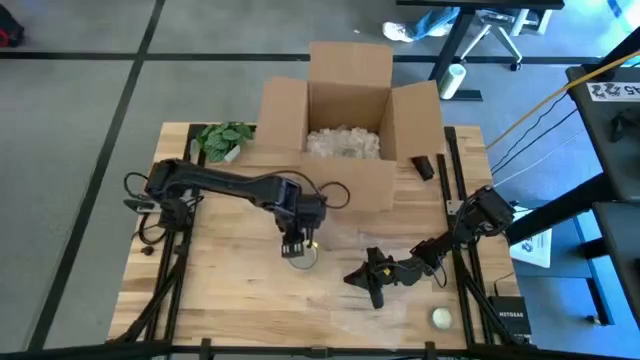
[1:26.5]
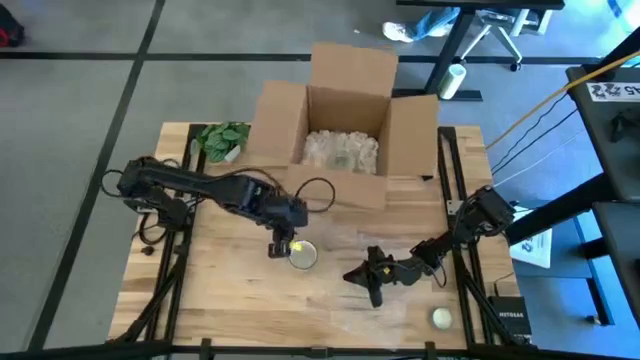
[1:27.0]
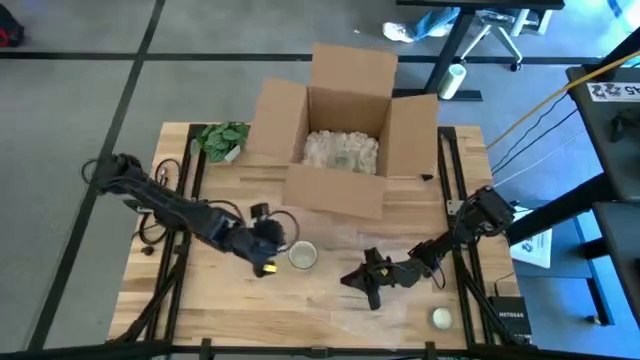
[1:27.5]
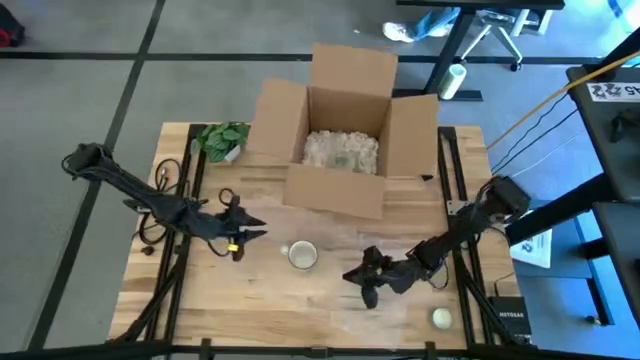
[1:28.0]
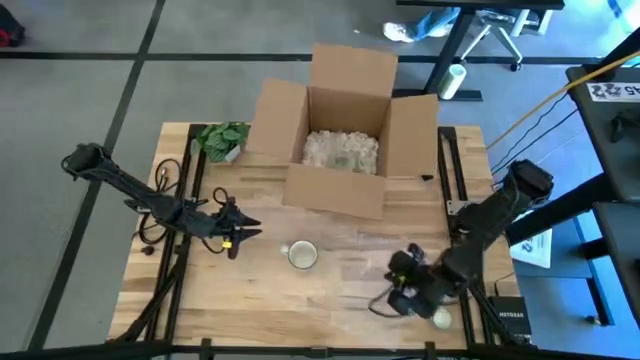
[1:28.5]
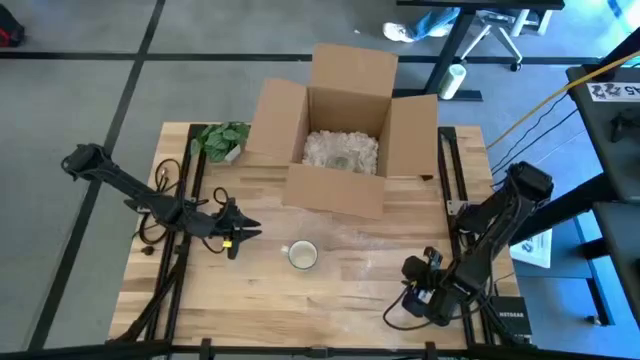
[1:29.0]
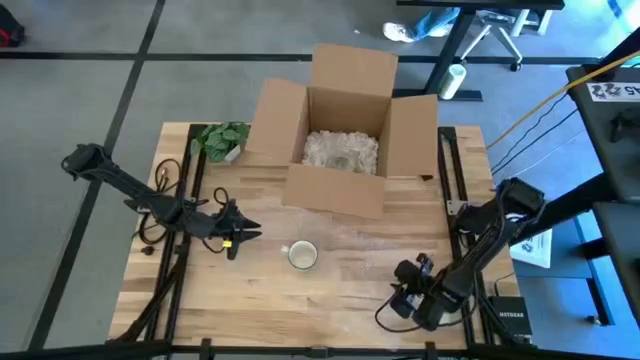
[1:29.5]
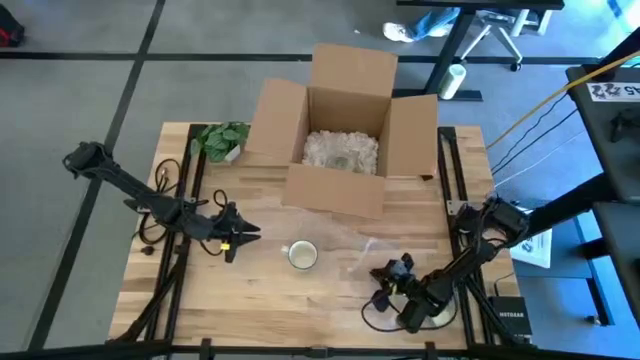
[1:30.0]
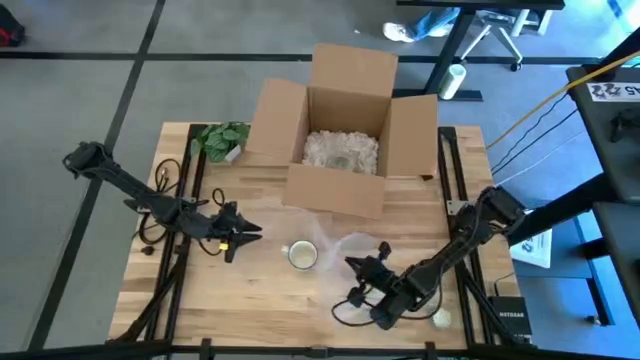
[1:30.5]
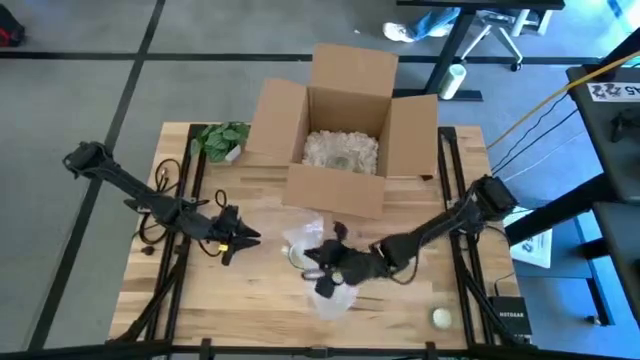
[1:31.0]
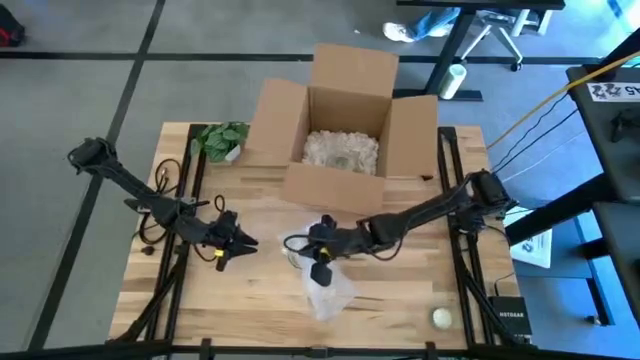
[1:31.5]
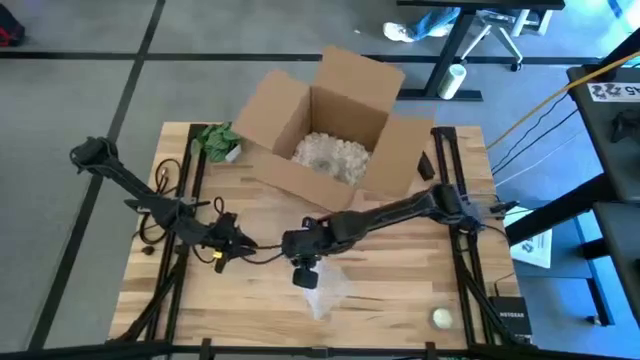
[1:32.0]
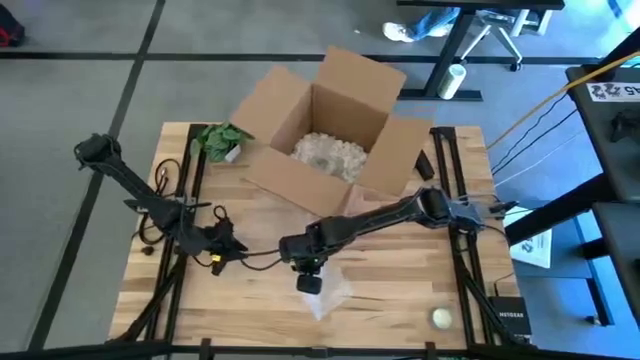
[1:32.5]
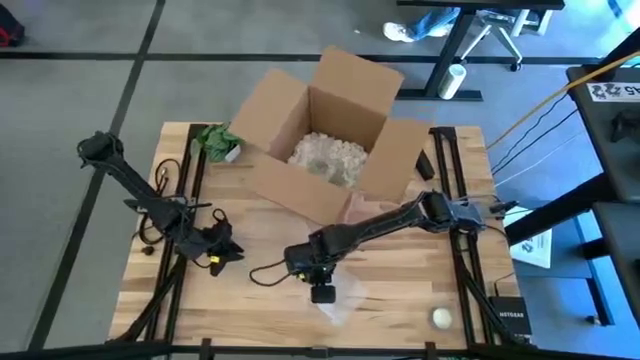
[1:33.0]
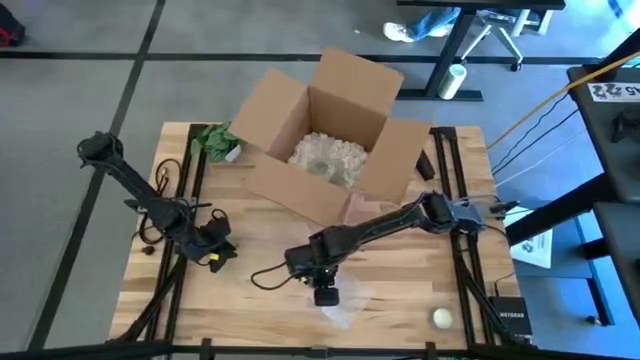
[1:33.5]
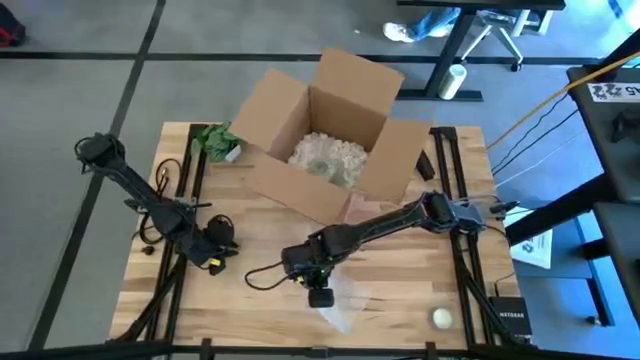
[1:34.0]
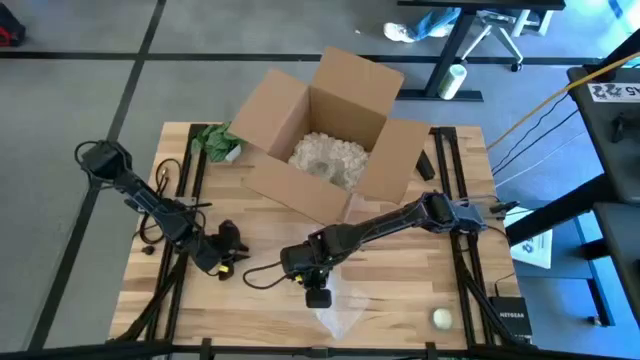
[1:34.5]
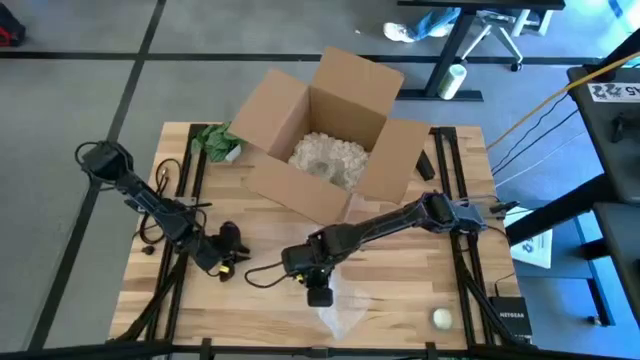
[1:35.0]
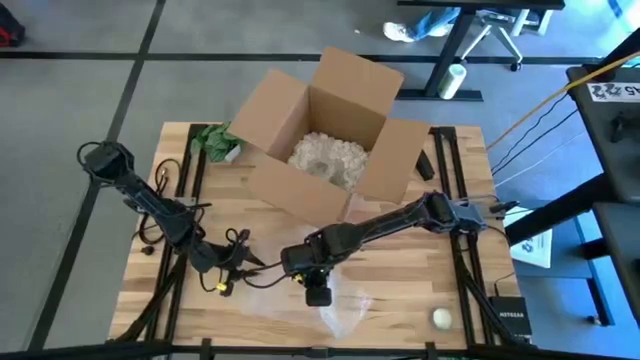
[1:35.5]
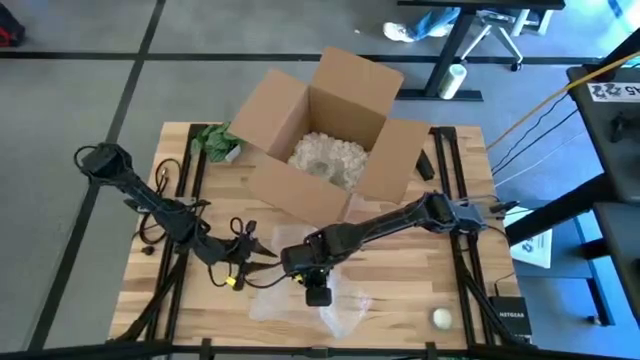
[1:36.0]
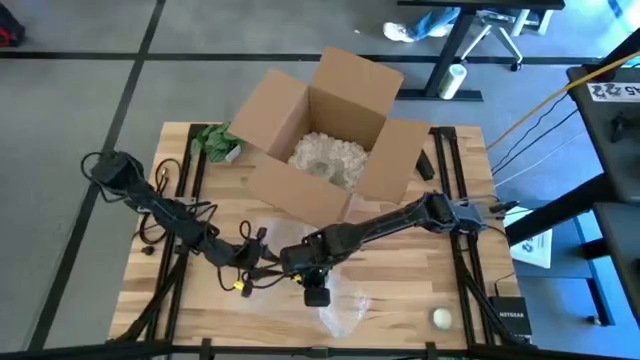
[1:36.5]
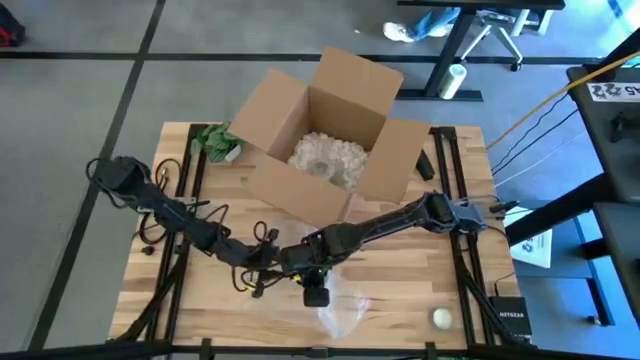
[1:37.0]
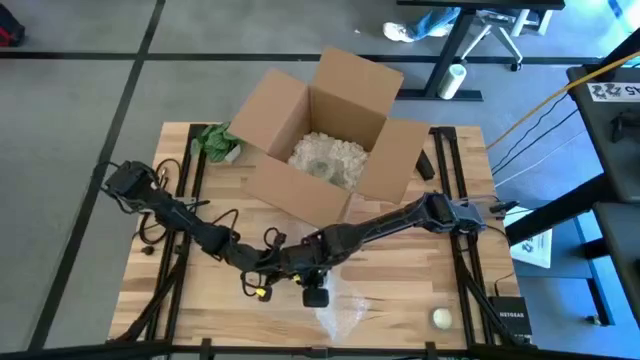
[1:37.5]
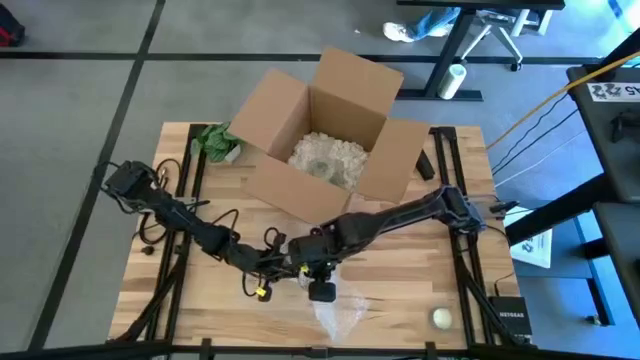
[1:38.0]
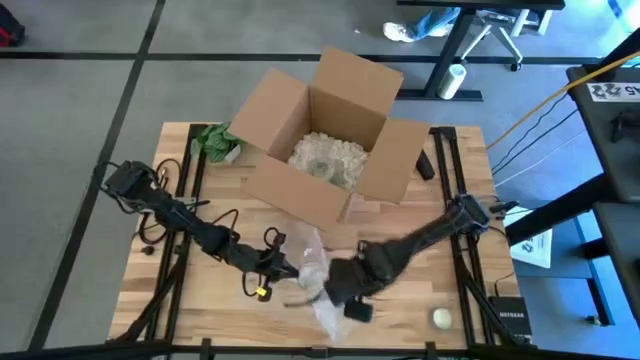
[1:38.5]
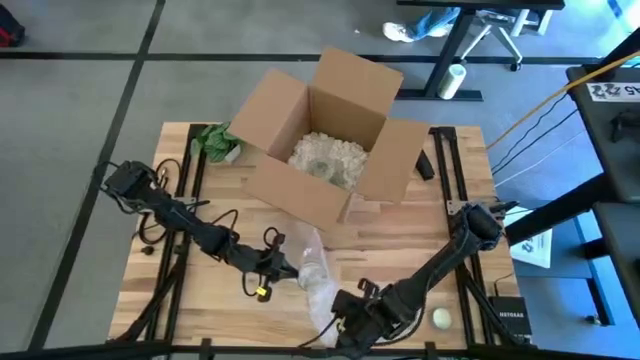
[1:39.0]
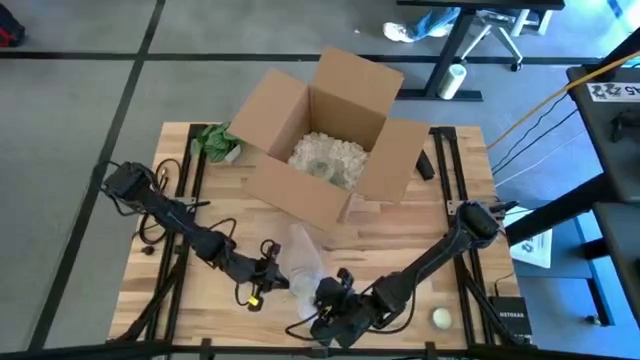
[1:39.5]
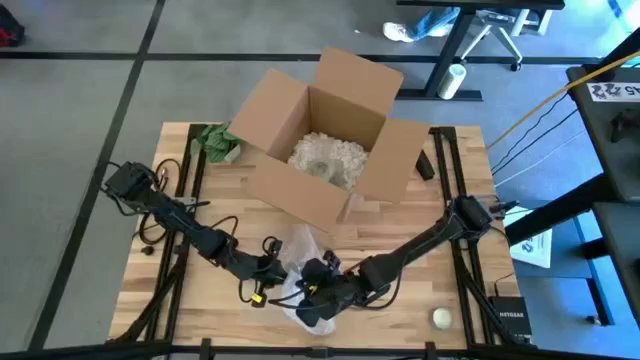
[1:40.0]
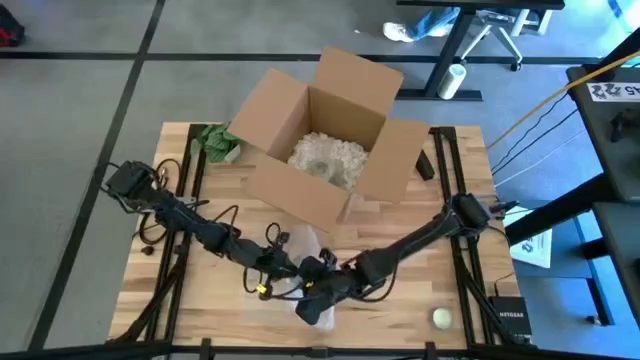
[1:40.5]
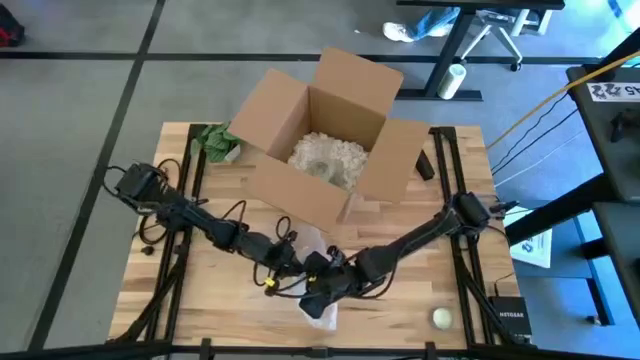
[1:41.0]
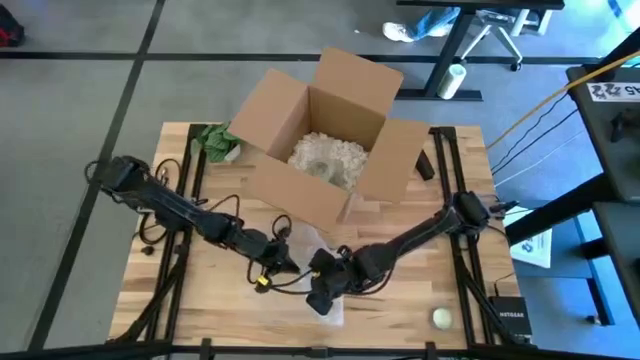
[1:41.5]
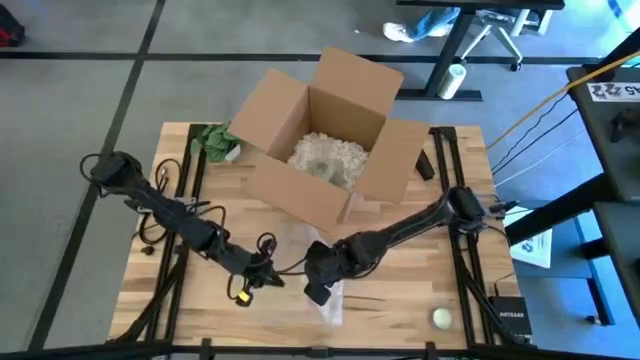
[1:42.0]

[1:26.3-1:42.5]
Task: wrap mug
Wrap the blue mug with the bubble wrap
